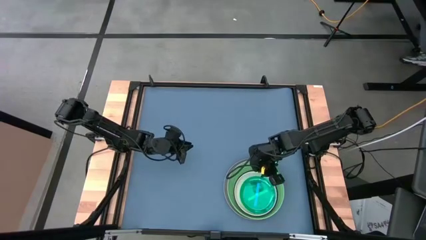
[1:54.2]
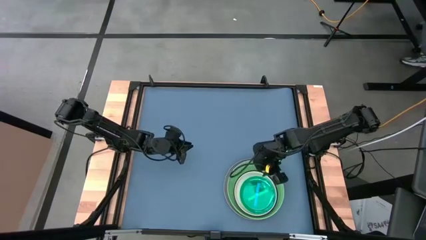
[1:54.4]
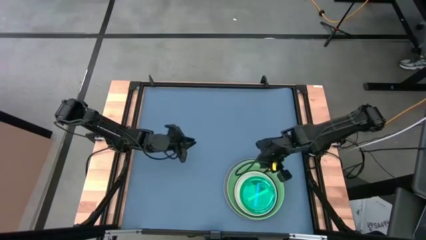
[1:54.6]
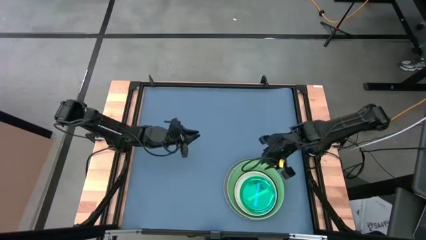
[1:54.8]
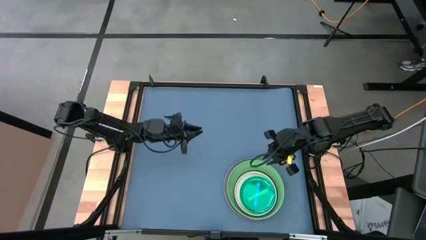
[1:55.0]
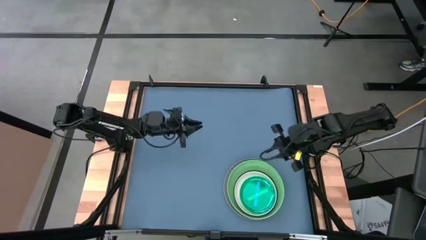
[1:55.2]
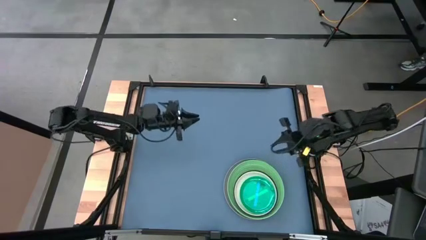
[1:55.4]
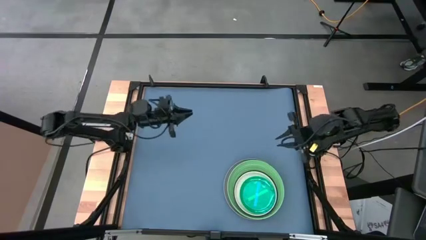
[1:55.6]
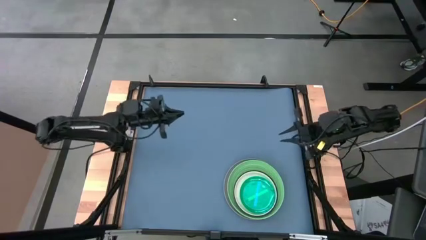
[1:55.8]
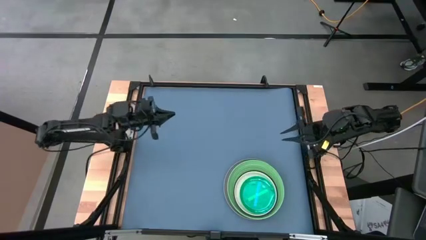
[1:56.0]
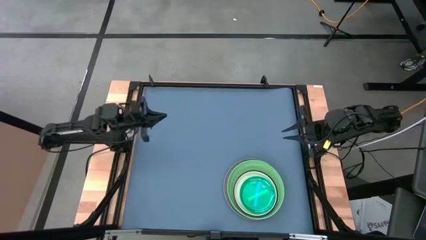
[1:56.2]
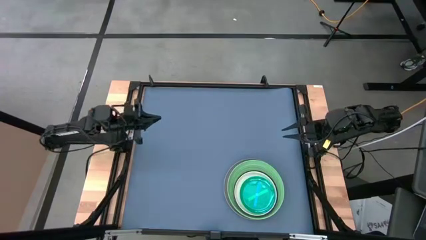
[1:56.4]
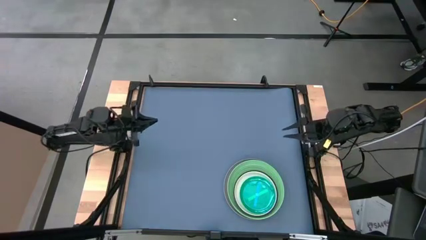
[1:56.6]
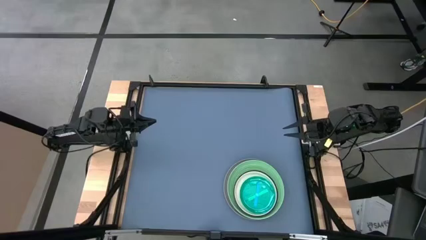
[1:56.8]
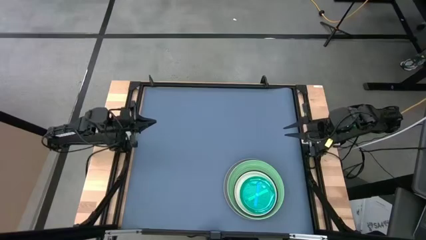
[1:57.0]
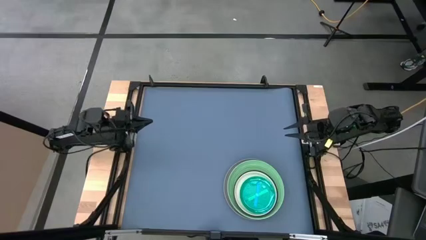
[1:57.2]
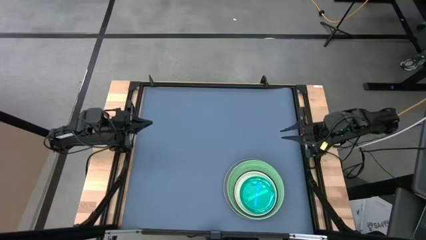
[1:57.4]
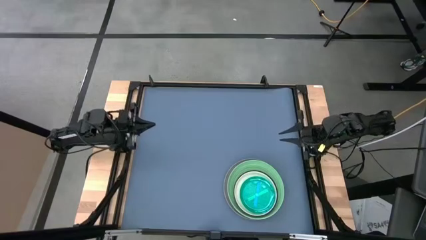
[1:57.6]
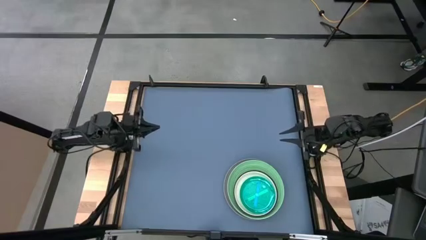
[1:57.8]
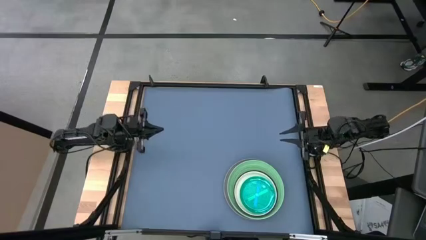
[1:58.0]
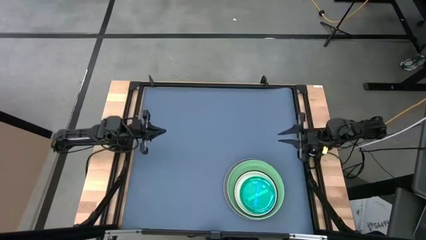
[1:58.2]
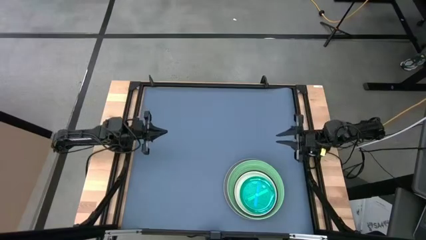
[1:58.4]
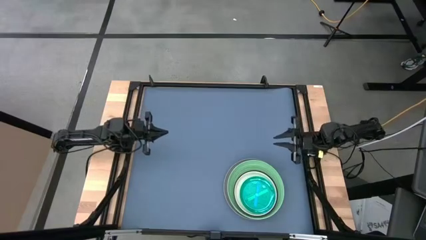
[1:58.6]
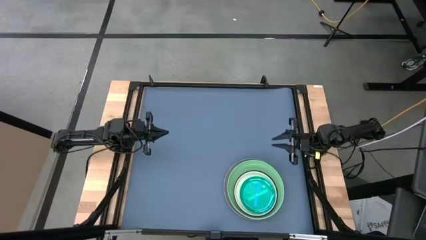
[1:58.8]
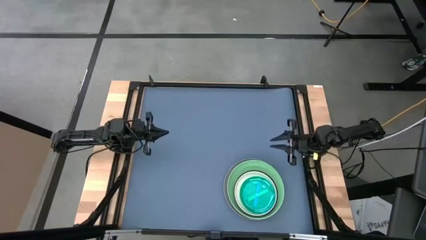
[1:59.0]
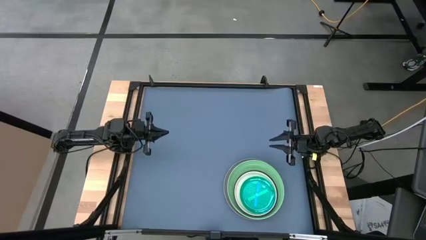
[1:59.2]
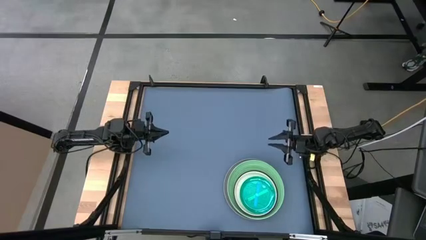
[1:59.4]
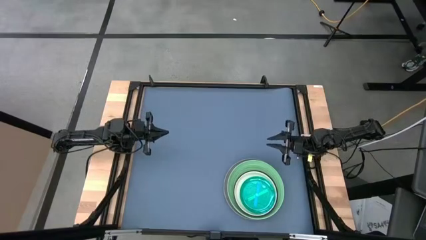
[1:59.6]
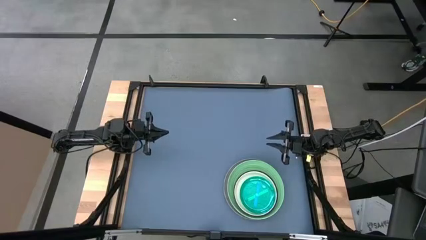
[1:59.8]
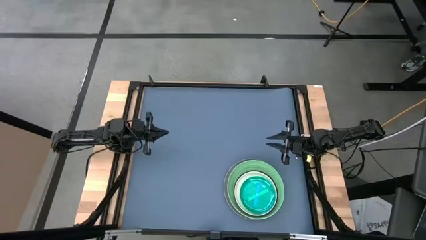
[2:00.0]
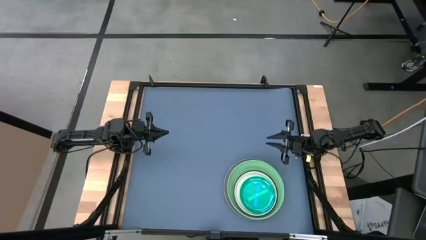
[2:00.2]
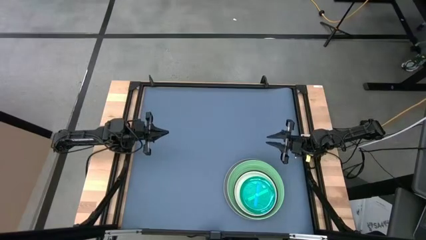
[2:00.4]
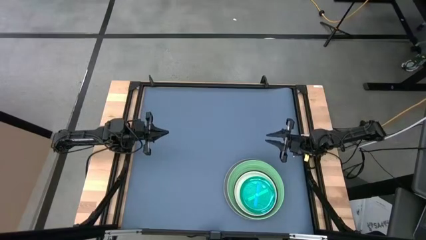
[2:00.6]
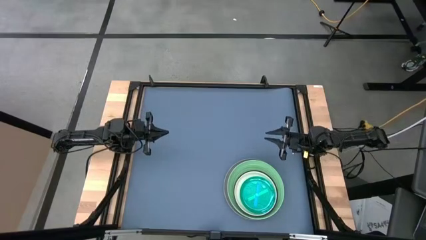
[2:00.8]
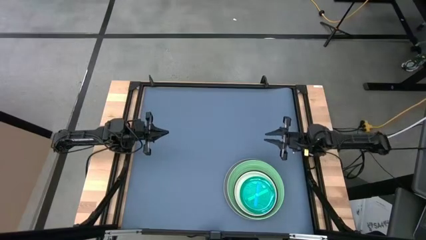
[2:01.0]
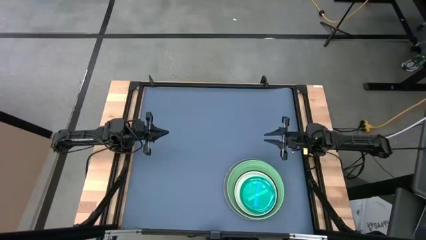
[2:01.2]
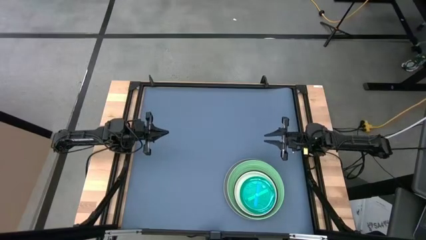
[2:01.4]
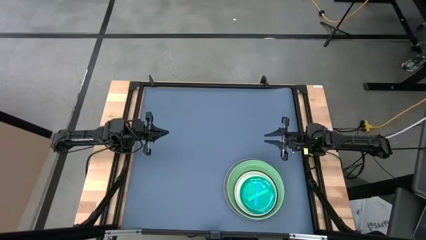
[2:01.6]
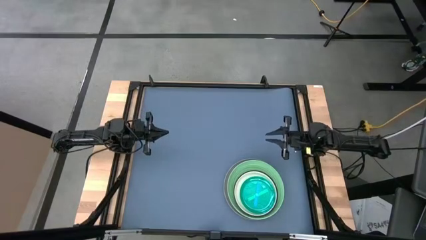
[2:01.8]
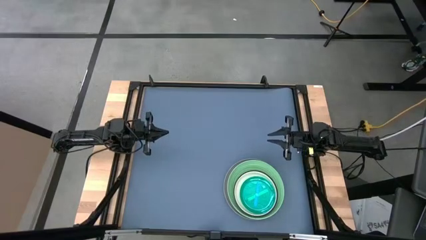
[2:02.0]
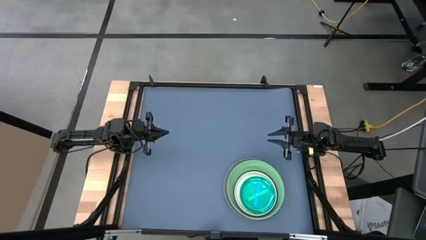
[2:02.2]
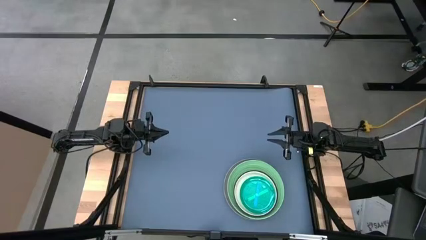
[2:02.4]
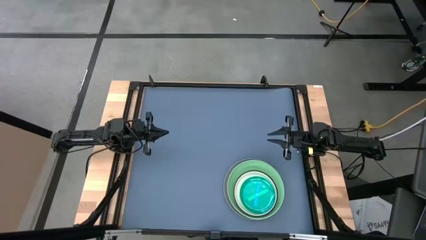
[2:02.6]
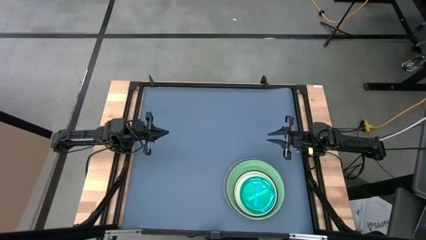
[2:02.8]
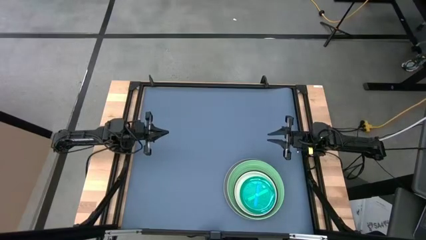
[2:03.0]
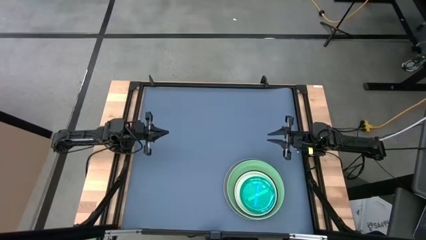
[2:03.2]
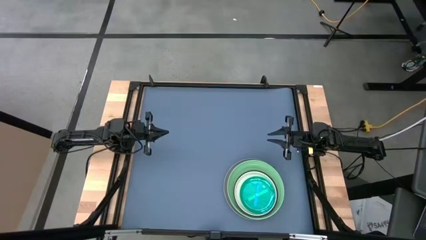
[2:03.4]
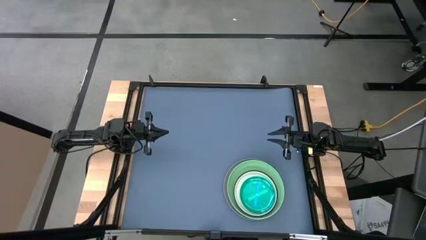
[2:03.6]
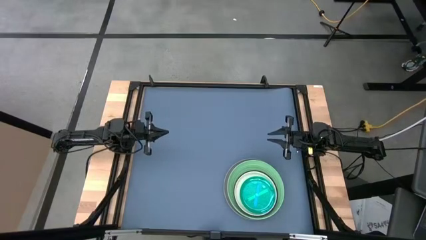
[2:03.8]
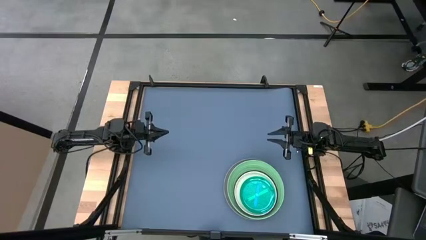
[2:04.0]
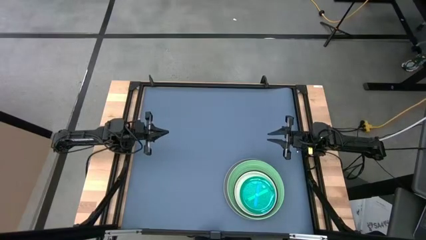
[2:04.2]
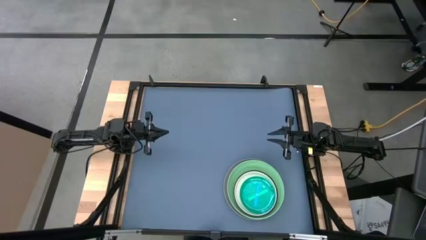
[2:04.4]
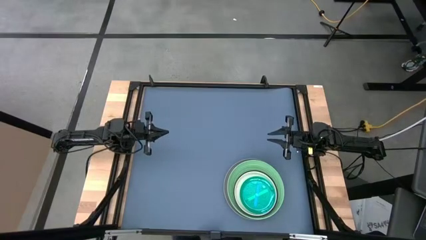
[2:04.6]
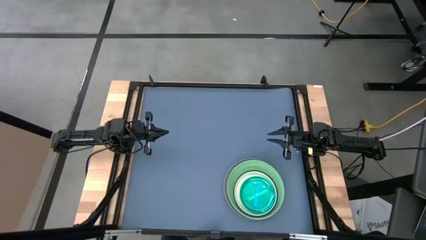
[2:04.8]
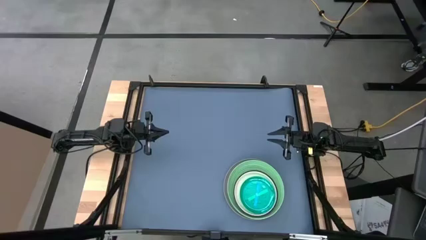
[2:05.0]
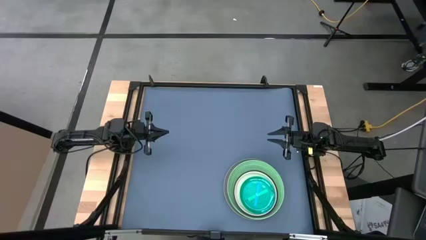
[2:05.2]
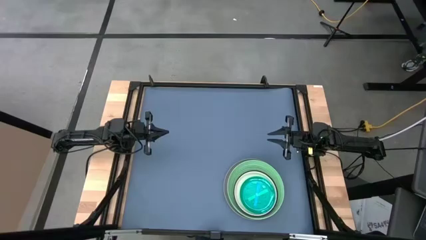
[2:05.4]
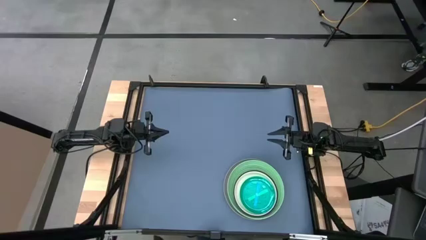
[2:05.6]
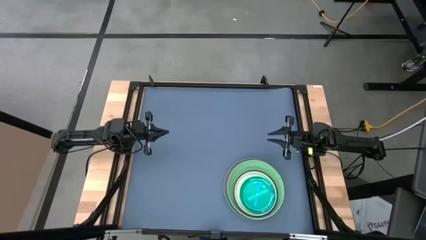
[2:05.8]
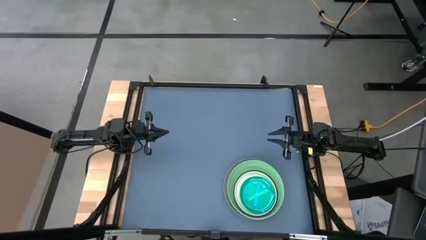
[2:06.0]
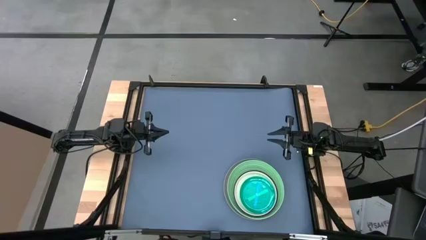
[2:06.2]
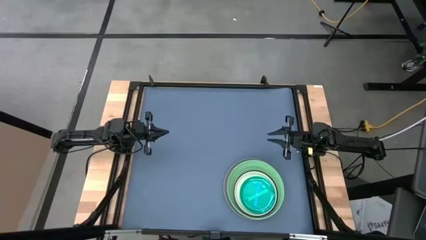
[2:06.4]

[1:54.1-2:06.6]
Task: Stack plastic plates
Return to Home Position

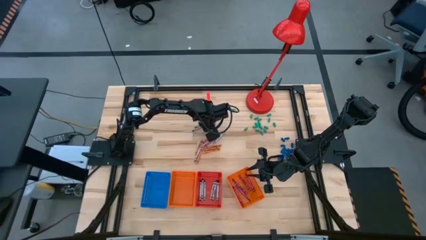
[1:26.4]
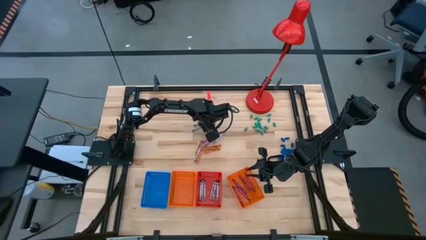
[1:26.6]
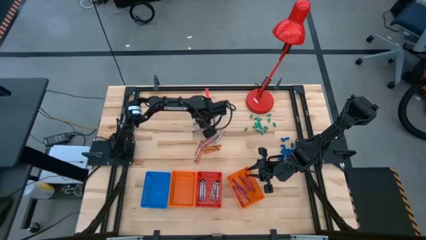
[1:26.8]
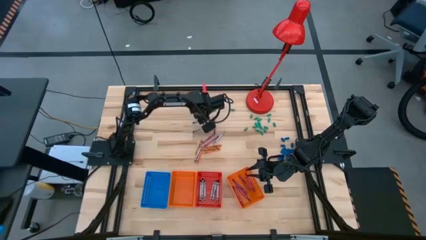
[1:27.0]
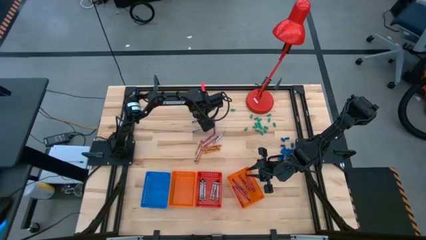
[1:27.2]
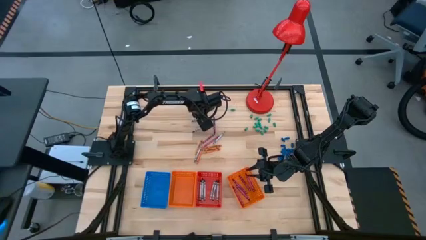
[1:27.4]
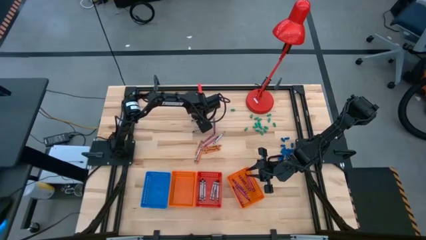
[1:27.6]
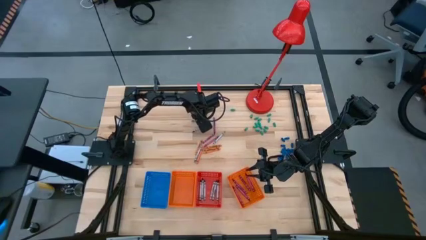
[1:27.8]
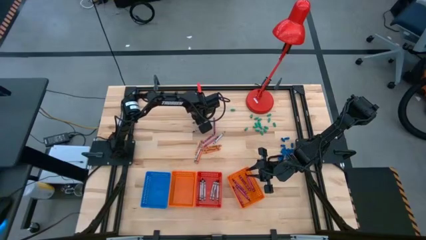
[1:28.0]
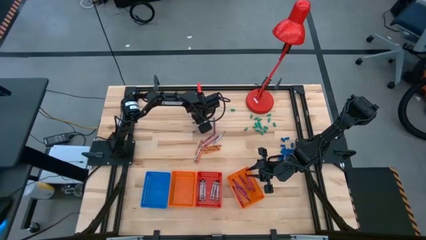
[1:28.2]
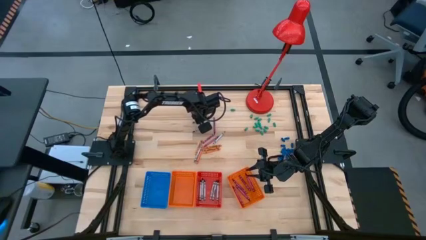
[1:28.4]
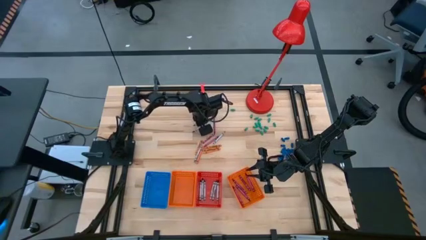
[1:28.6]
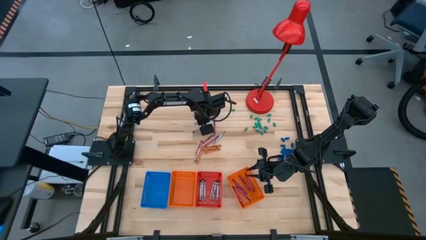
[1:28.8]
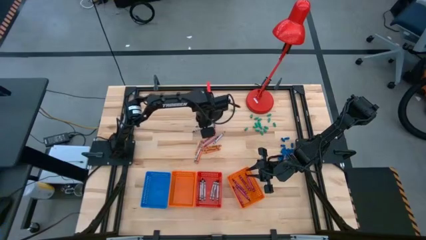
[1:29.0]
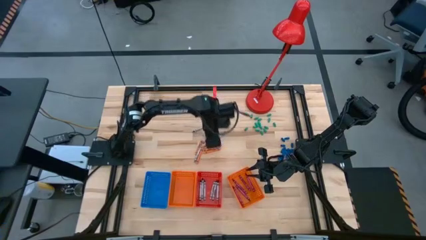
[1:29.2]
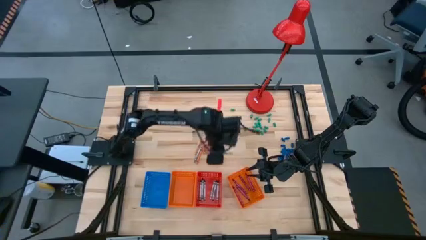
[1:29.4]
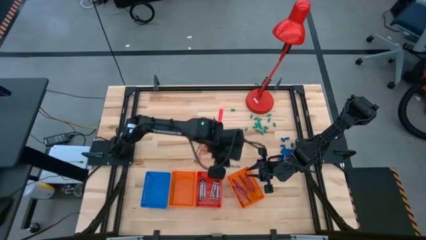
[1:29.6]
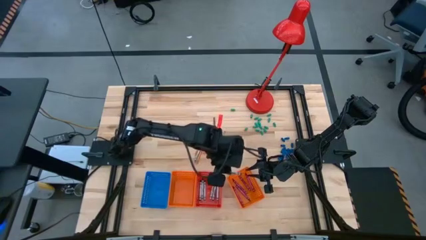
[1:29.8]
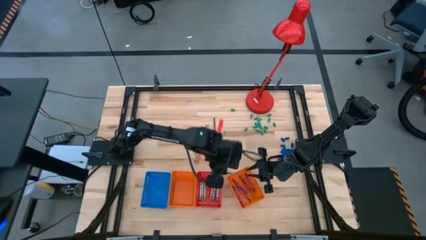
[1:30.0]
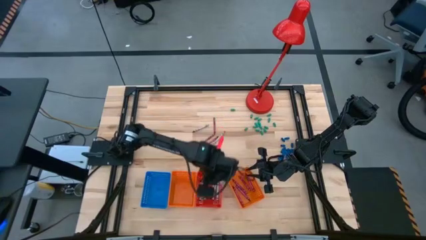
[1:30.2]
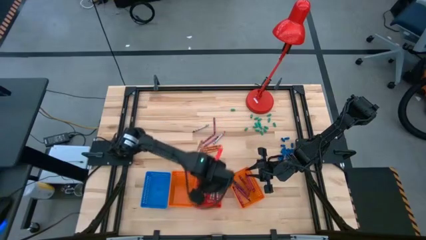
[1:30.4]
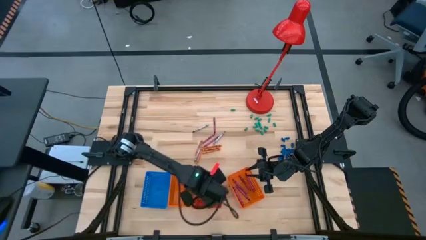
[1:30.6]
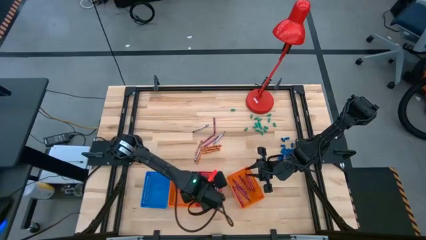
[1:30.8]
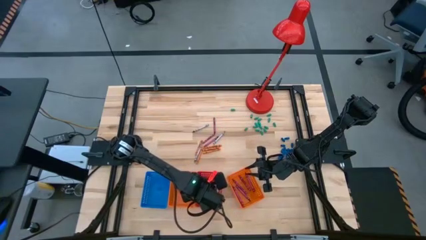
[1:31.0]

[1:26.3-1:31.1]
Task: Sort crayons
Put the black crayon into the red bin
